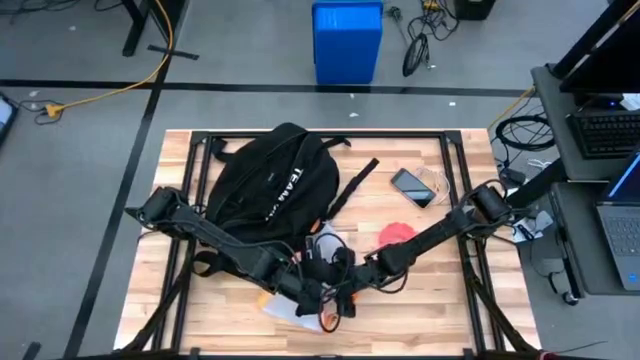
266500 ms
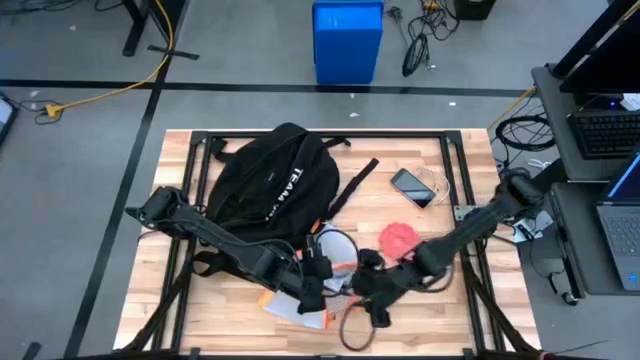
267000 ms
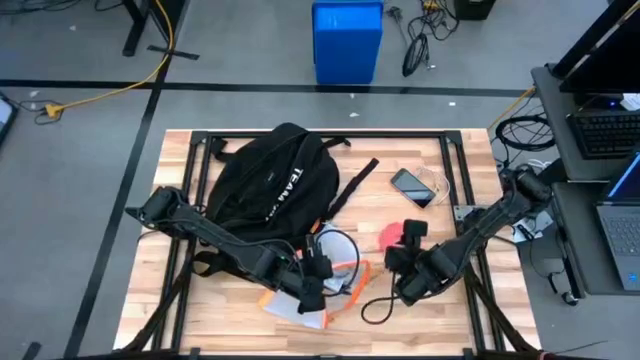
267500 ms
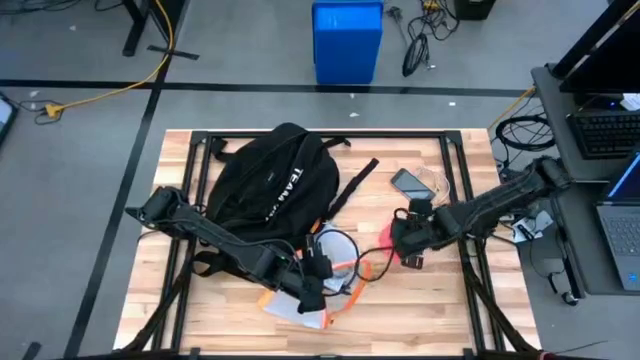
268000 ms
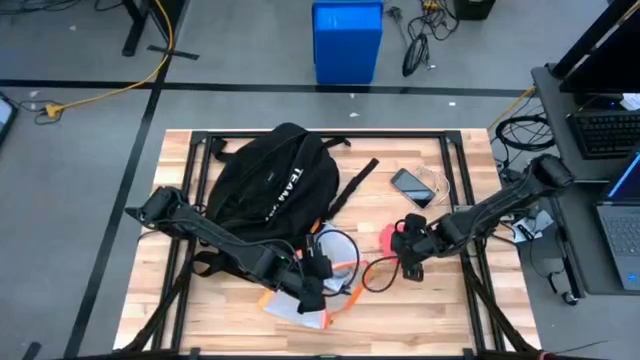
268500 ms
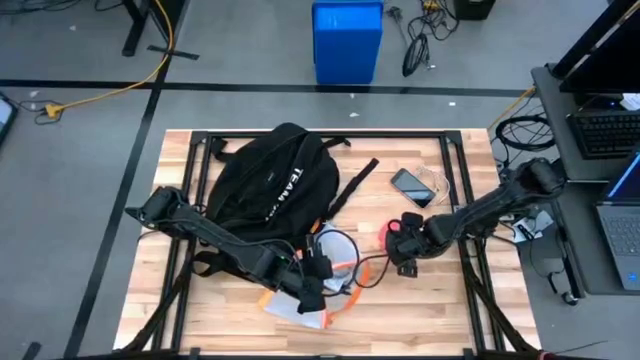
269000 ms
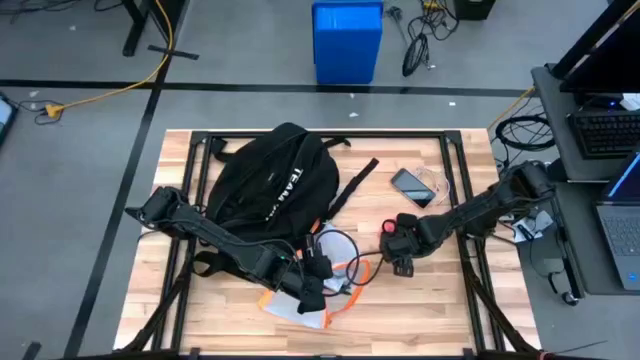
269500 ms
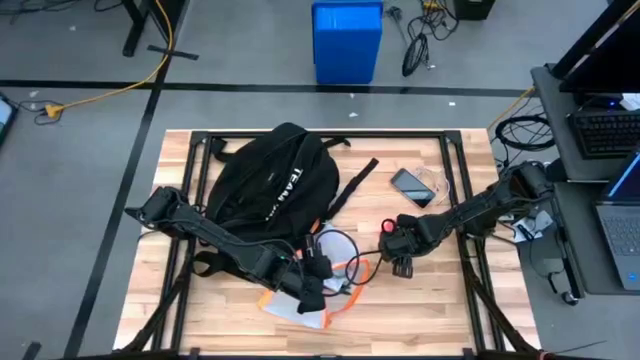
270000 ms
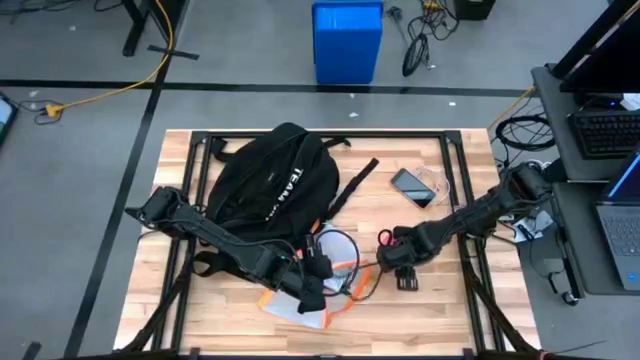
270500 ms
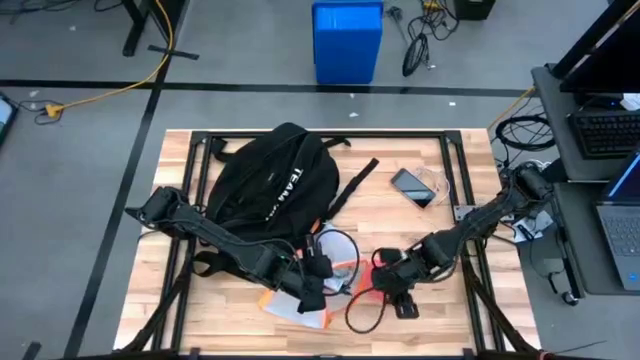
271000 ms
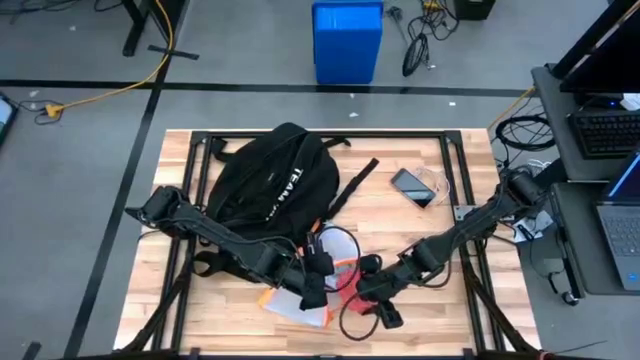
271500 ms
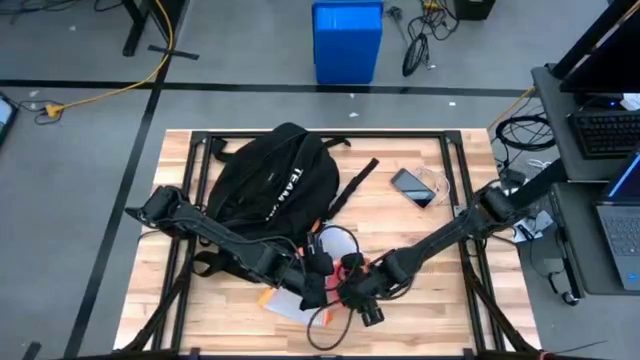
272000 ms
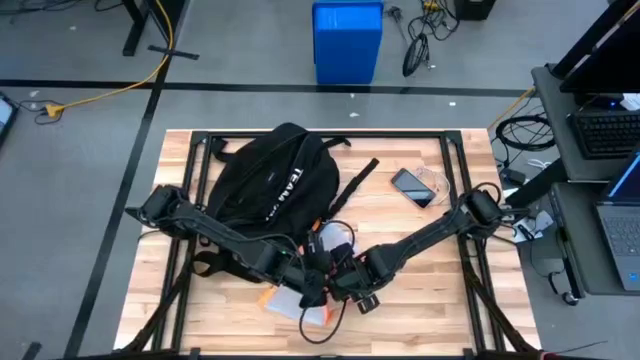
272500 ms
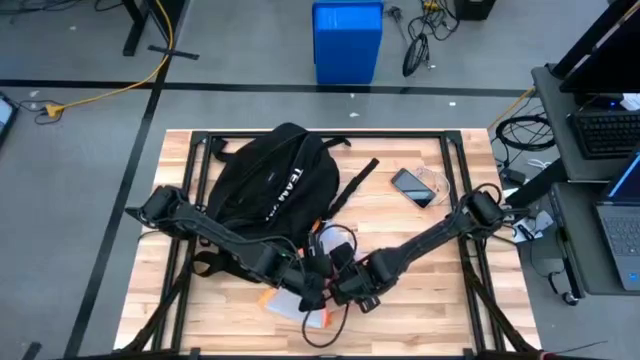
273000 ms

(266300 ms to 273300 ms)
Task: Unpack backpack
Put the pill organizer into the orange zip bag

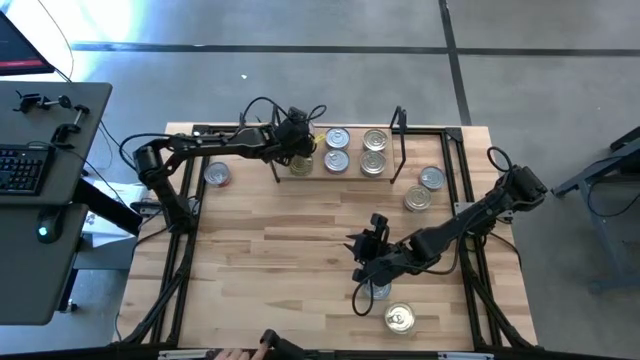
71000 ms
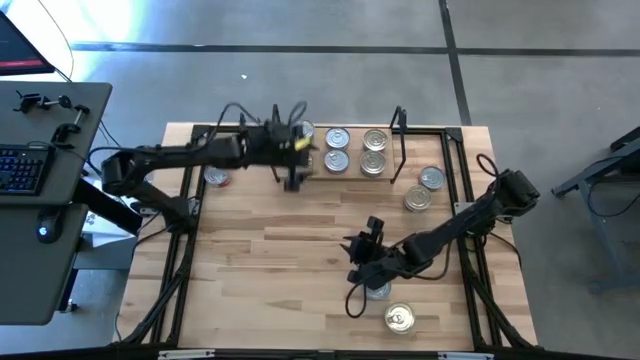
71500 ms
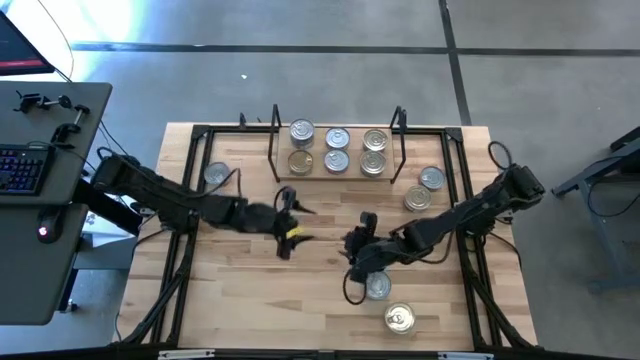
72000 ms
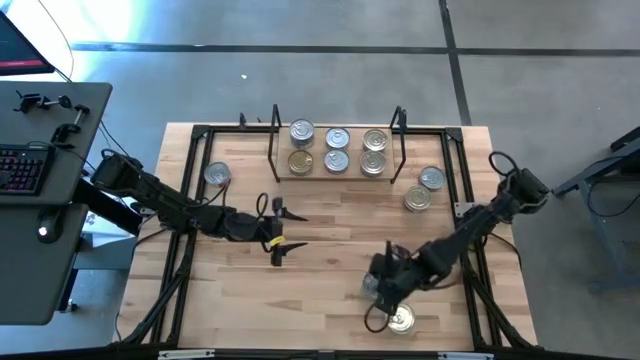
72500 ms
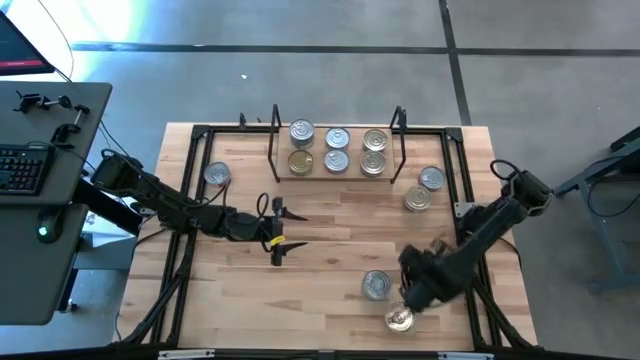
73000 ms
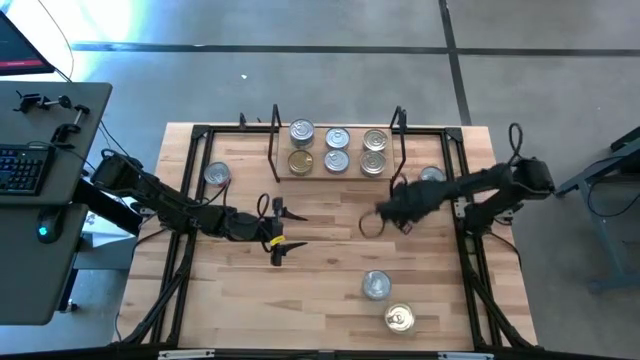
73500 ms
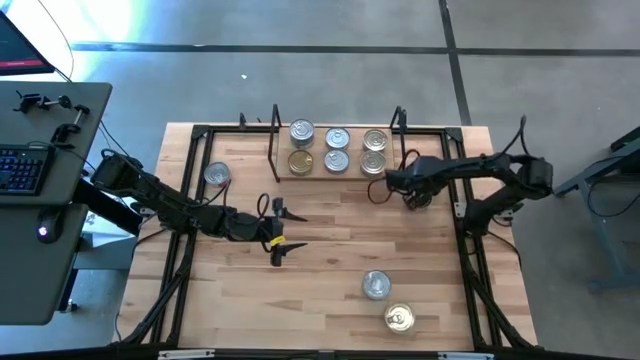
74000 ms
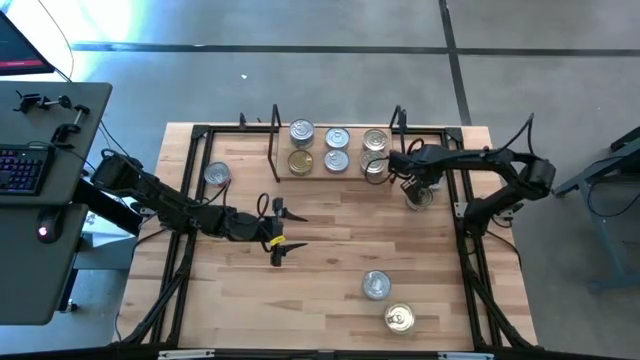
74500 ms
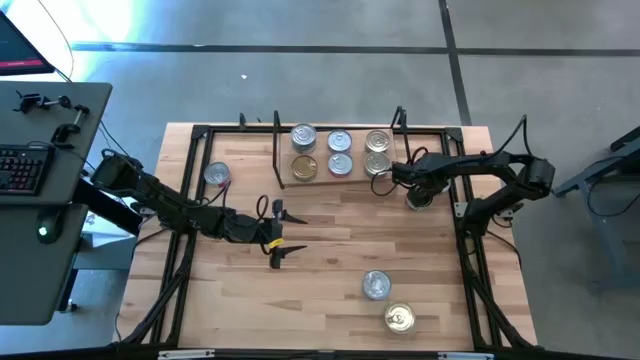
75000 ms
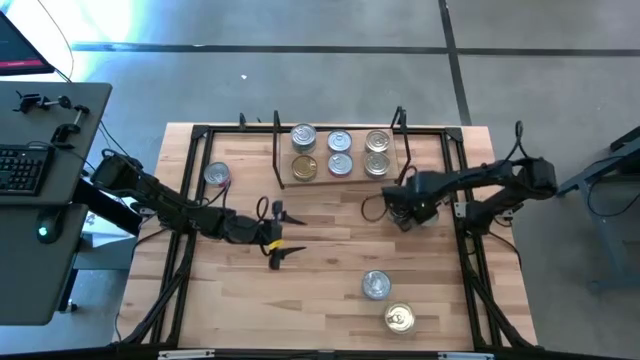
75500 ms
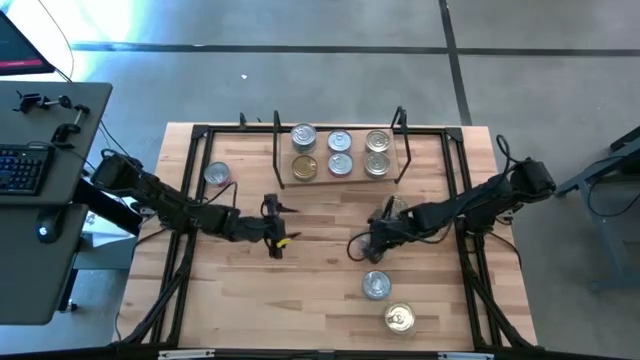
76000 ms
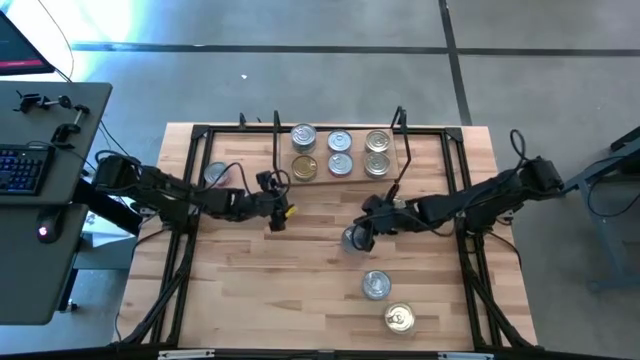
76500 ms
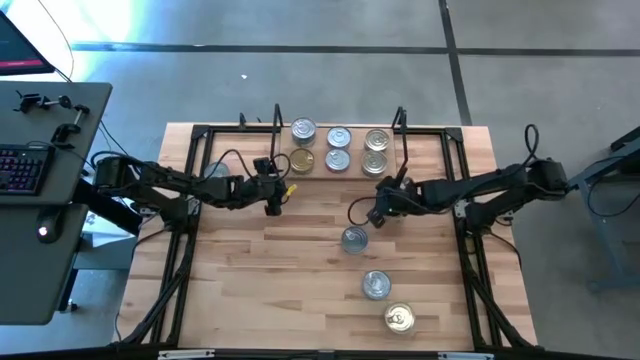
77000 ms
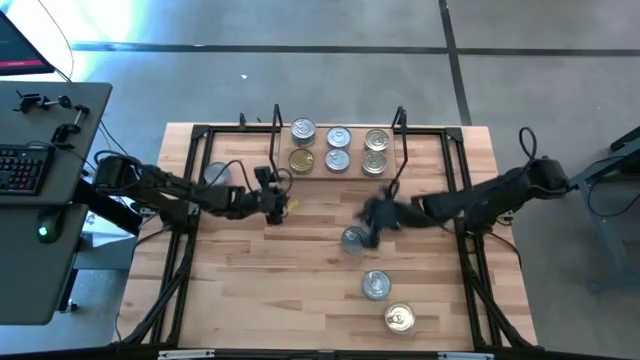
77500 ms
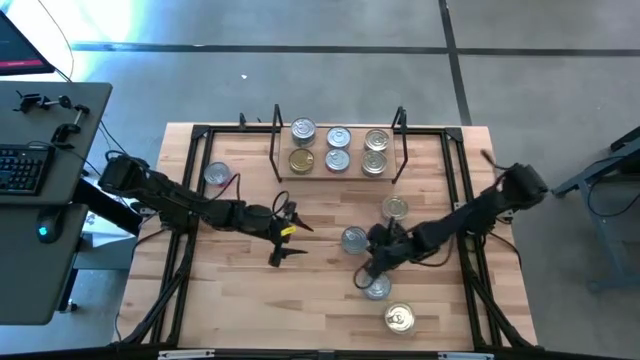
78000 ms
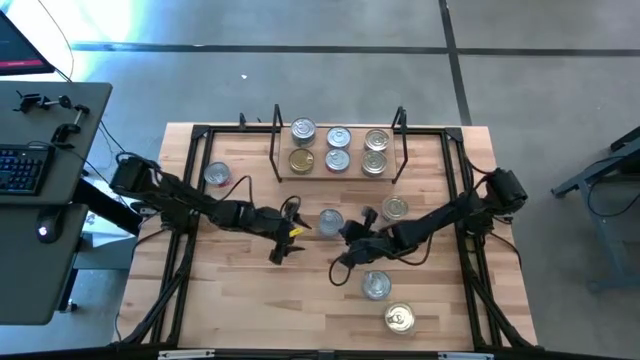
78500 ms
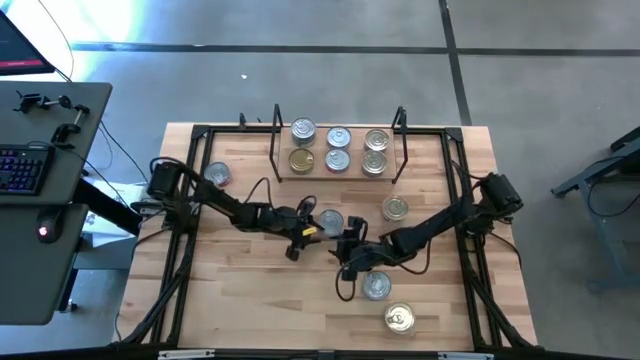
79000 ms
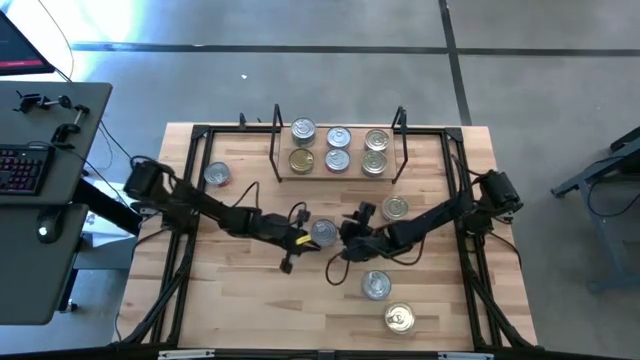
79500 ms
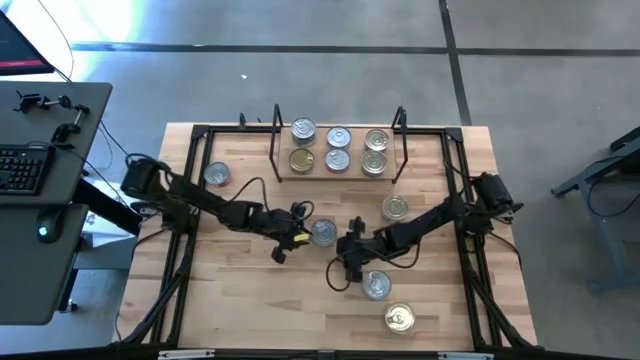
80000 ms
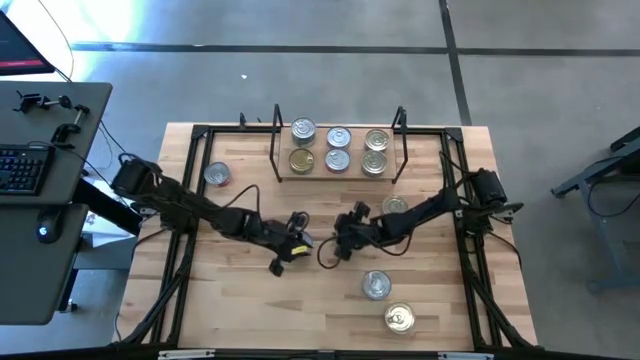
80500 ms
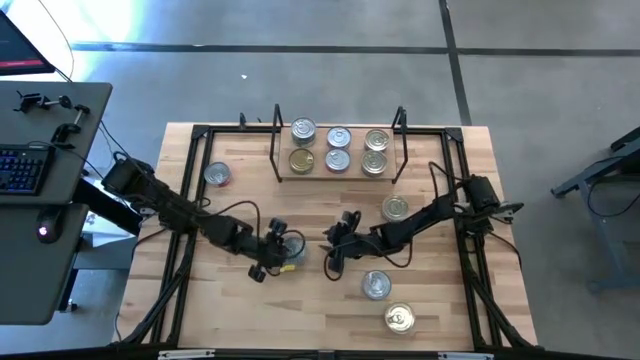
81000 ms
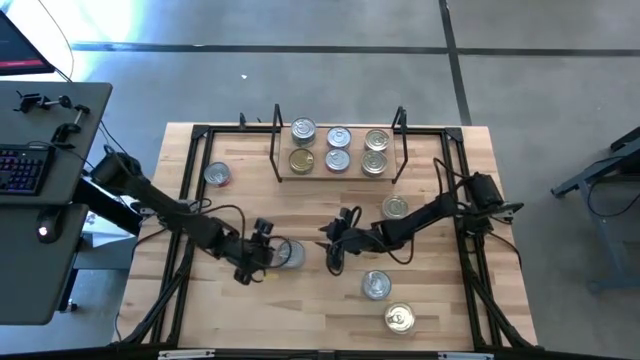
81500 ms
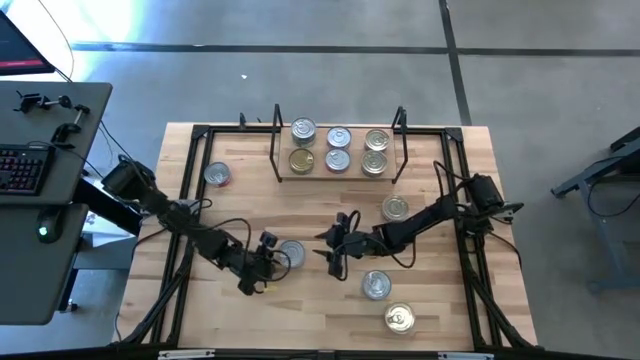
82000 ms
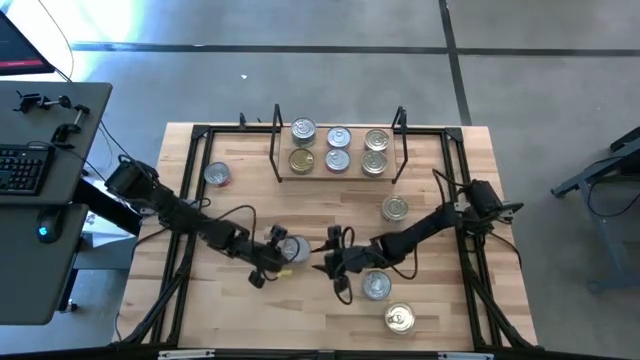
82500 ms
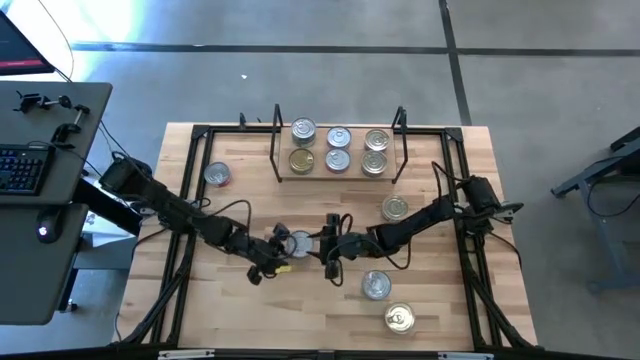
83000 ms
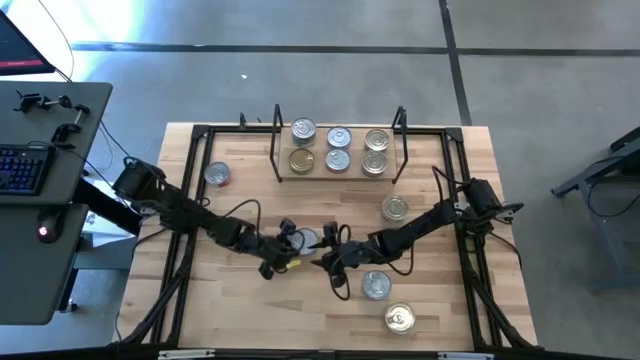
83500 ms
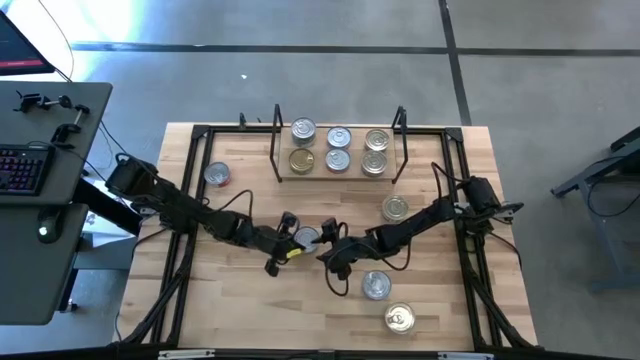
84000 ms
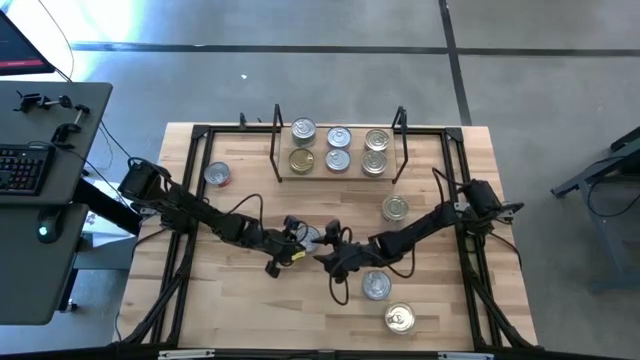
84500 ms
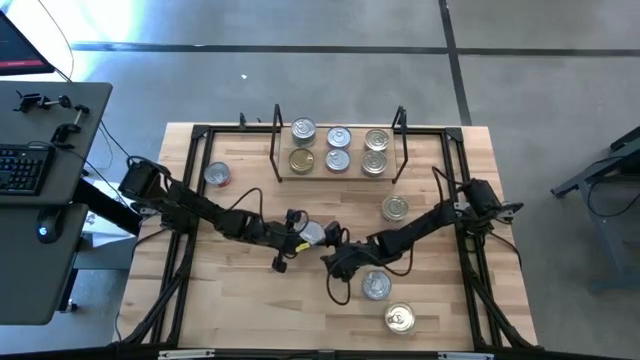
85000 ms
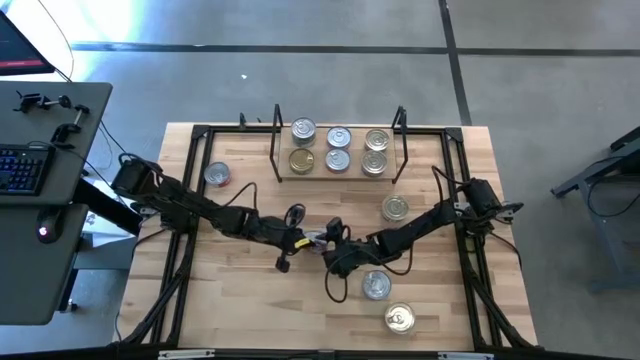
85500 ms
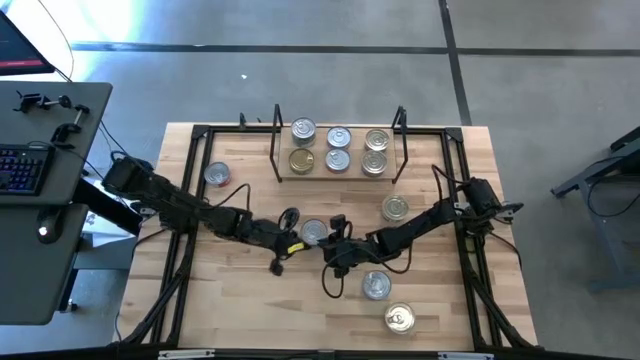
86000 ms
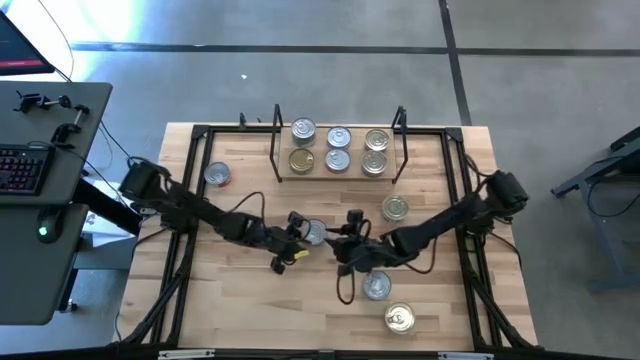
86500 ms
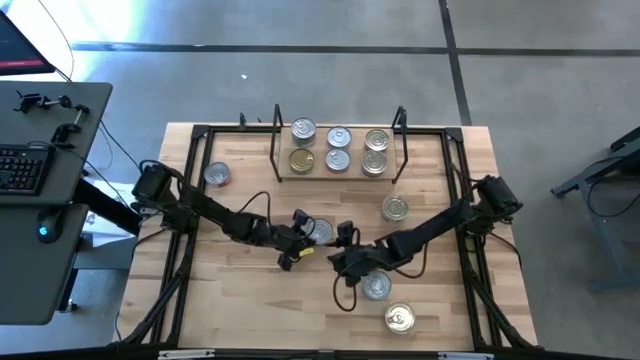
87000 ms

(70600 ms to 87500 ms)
Task: Stack canned seafood by type on shelf
Stack the right red tuna can on top of the red tuna can on the shelf
